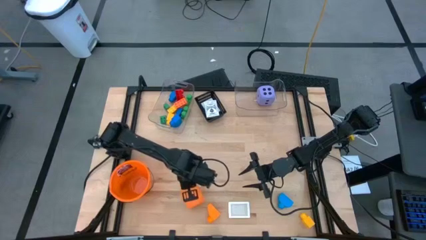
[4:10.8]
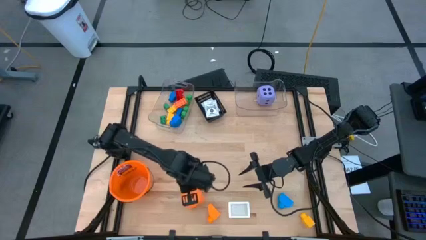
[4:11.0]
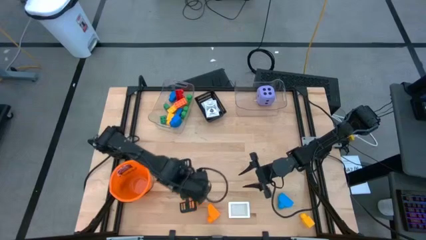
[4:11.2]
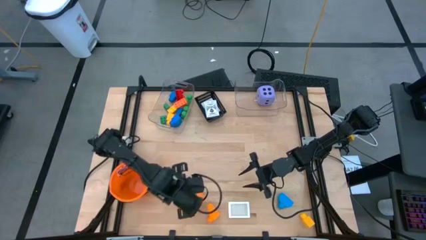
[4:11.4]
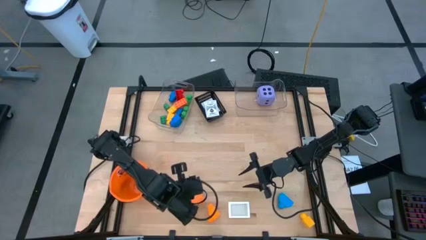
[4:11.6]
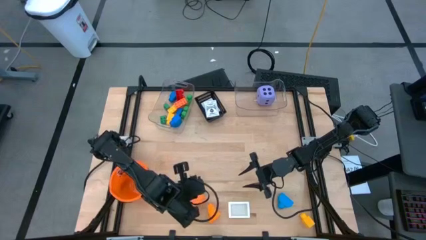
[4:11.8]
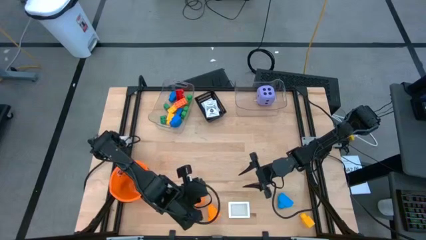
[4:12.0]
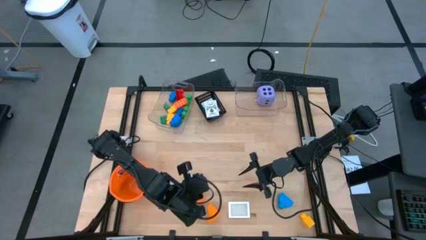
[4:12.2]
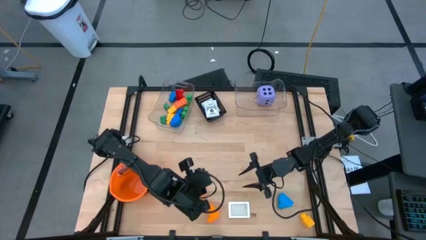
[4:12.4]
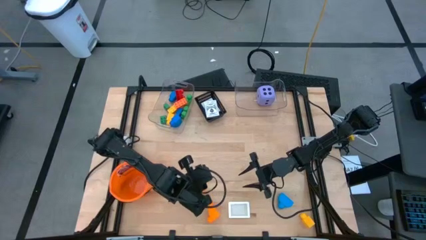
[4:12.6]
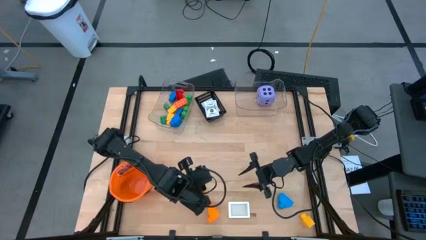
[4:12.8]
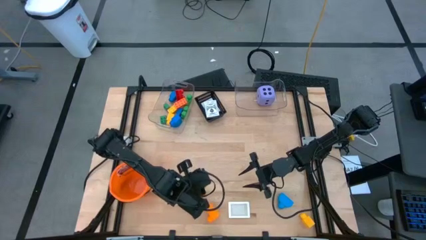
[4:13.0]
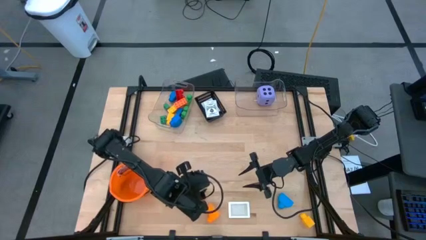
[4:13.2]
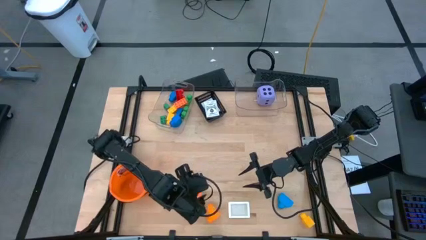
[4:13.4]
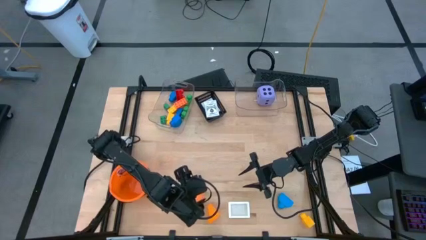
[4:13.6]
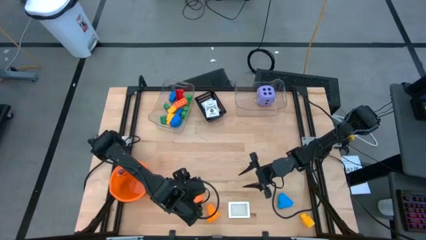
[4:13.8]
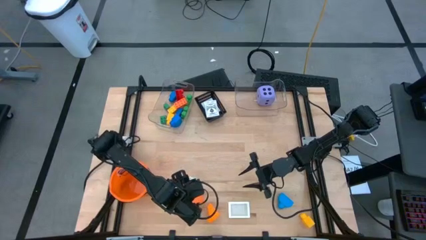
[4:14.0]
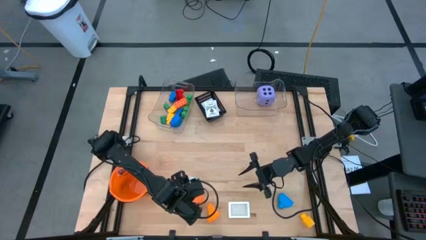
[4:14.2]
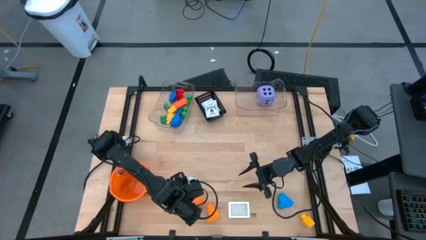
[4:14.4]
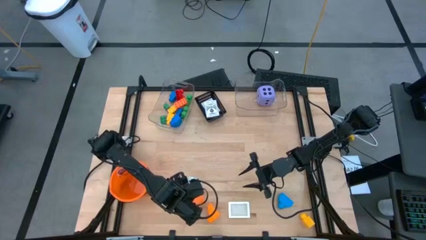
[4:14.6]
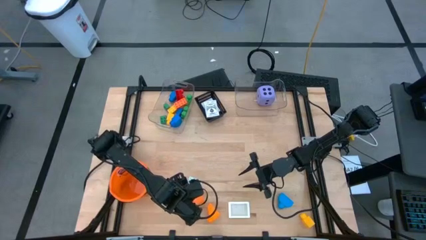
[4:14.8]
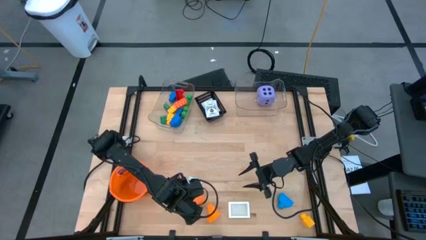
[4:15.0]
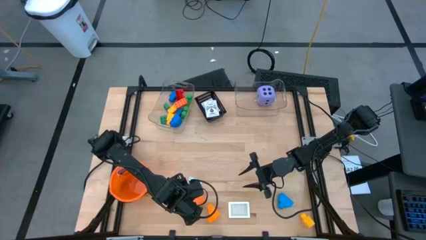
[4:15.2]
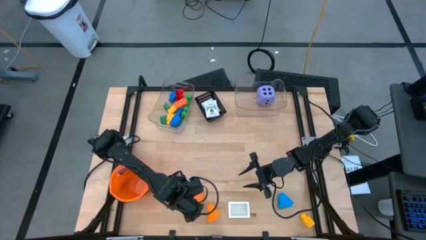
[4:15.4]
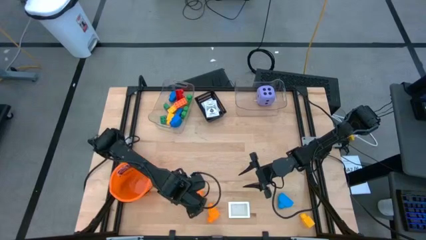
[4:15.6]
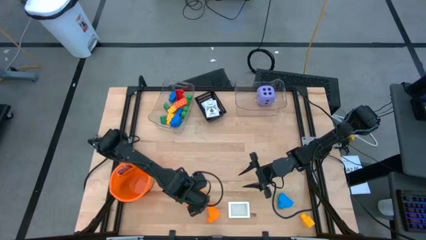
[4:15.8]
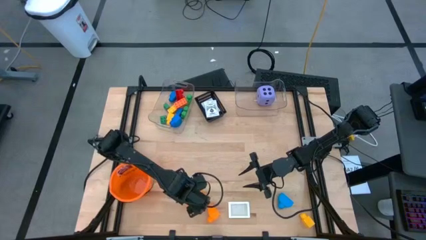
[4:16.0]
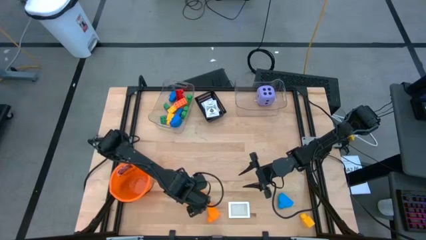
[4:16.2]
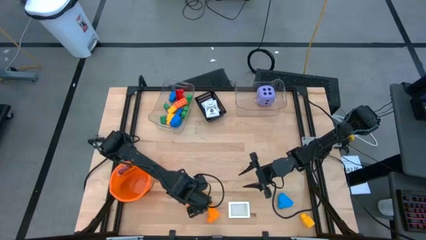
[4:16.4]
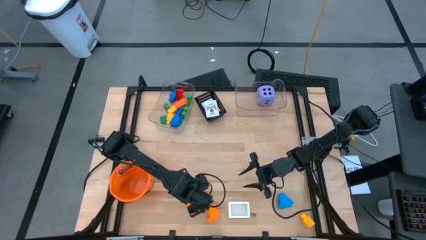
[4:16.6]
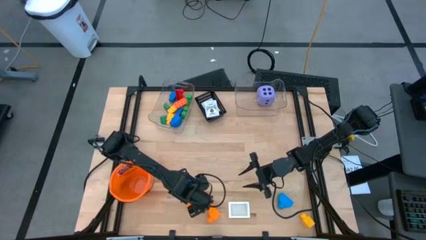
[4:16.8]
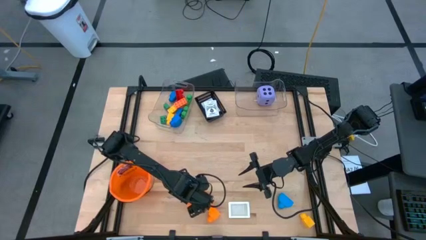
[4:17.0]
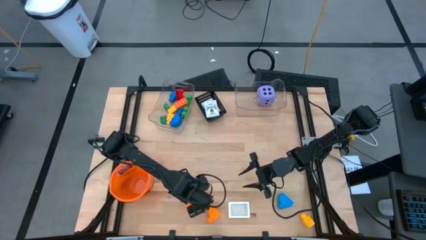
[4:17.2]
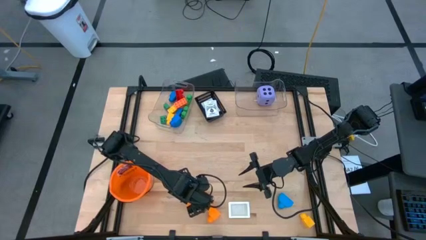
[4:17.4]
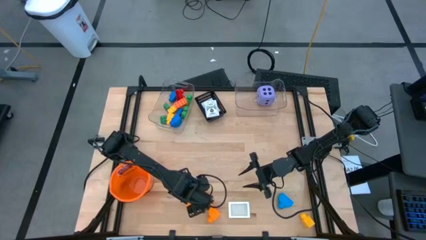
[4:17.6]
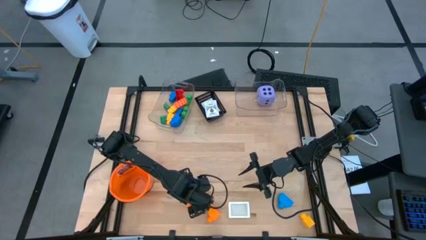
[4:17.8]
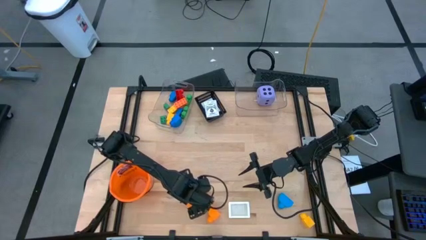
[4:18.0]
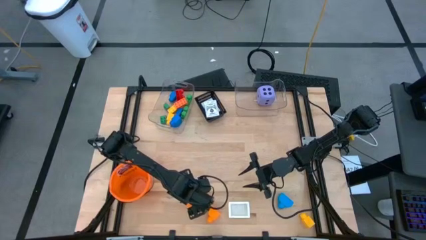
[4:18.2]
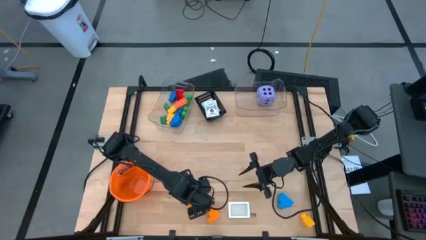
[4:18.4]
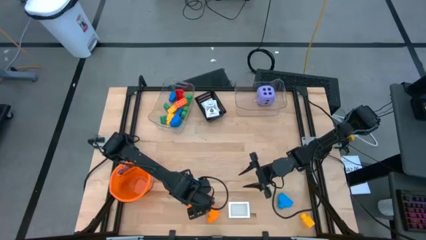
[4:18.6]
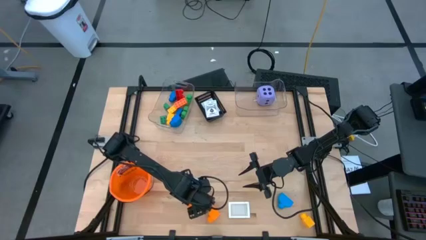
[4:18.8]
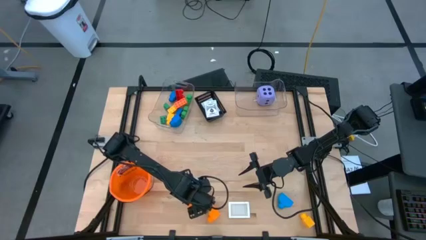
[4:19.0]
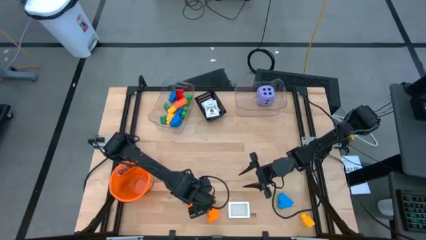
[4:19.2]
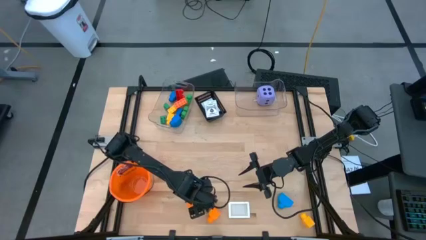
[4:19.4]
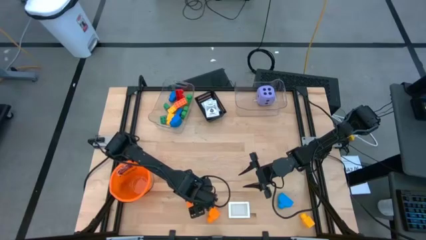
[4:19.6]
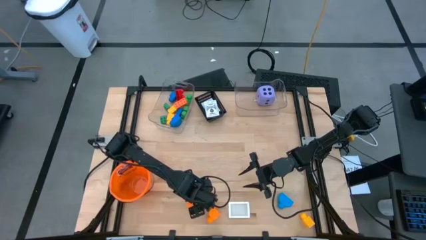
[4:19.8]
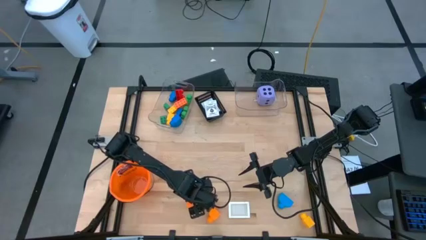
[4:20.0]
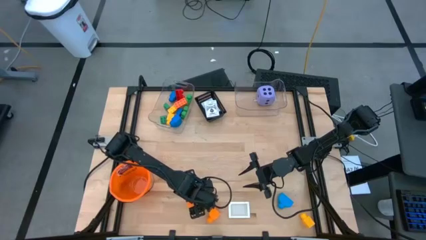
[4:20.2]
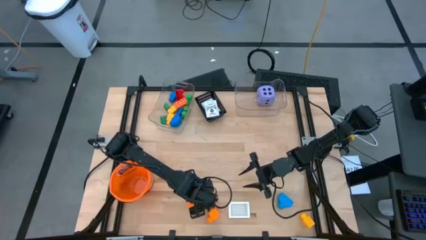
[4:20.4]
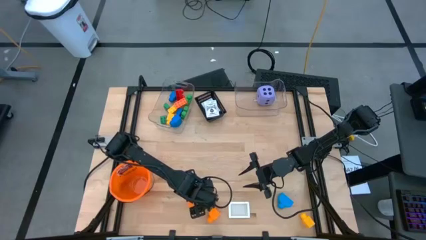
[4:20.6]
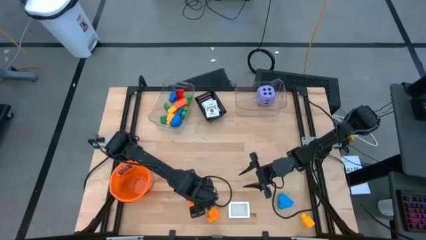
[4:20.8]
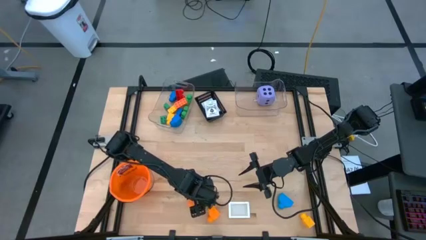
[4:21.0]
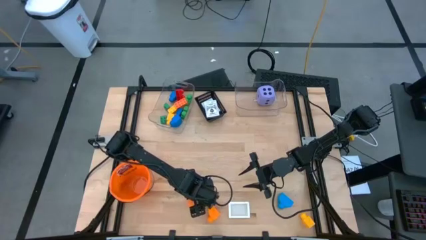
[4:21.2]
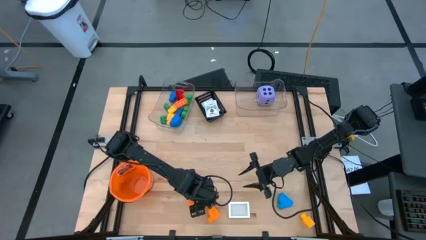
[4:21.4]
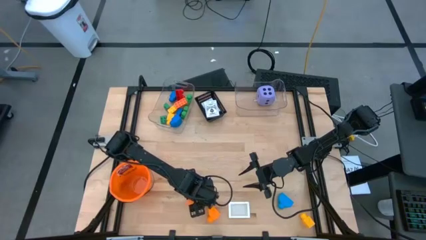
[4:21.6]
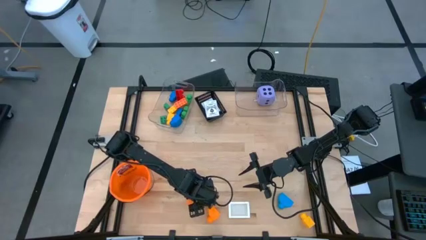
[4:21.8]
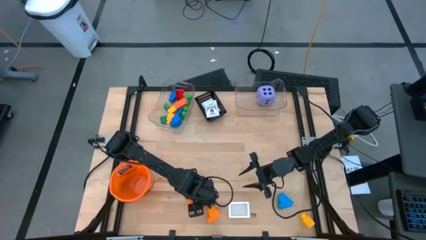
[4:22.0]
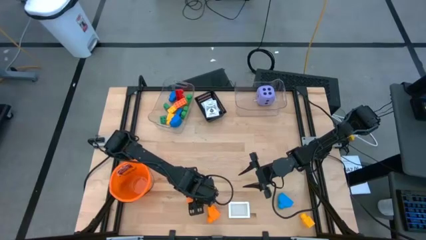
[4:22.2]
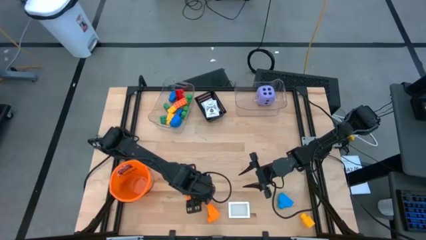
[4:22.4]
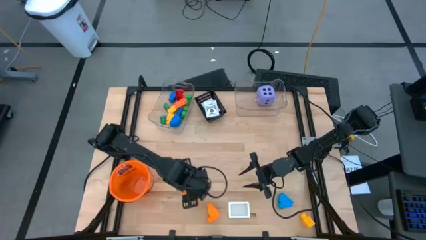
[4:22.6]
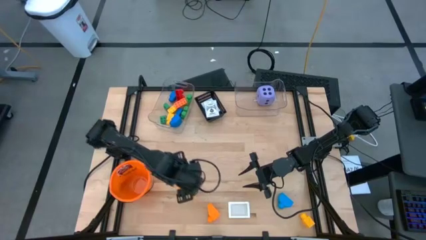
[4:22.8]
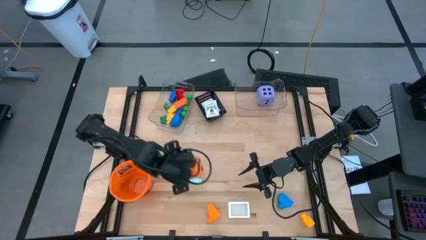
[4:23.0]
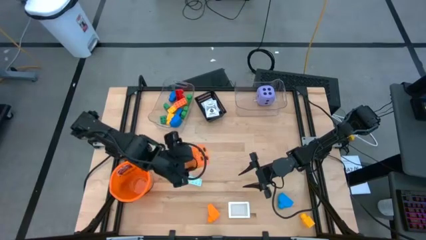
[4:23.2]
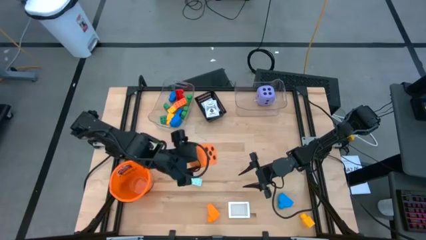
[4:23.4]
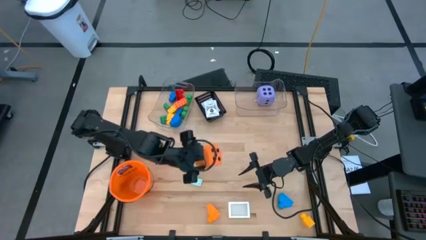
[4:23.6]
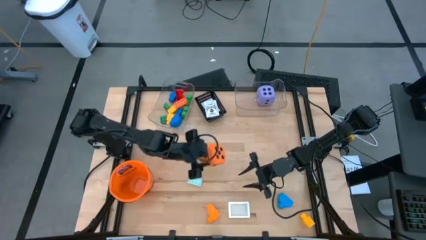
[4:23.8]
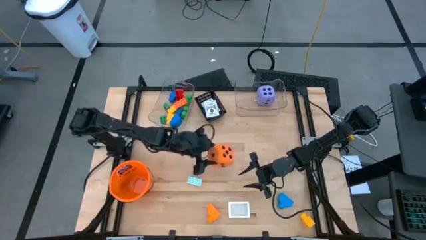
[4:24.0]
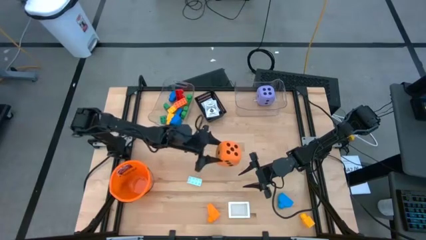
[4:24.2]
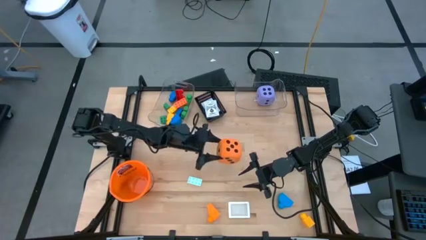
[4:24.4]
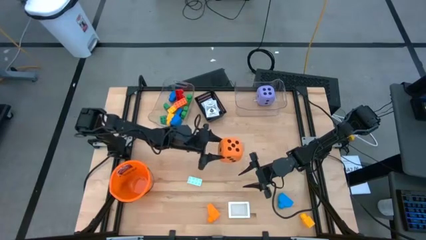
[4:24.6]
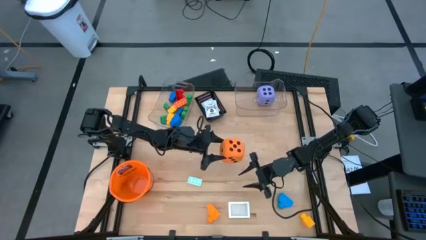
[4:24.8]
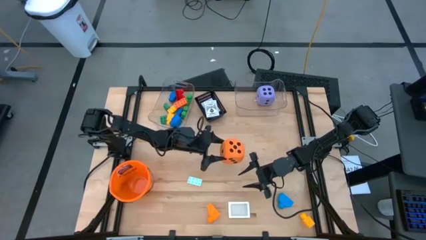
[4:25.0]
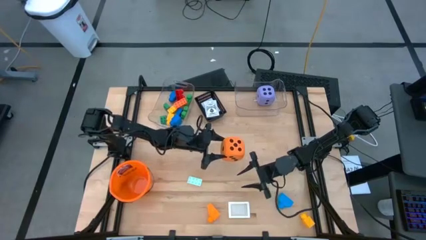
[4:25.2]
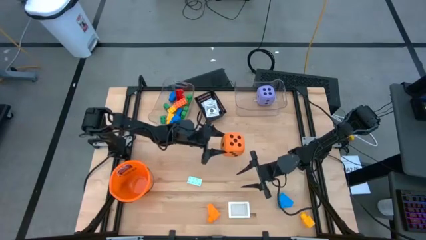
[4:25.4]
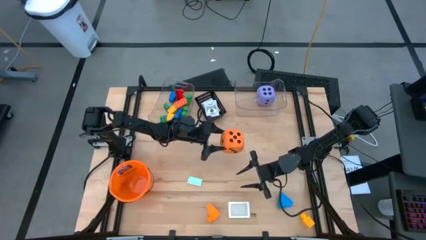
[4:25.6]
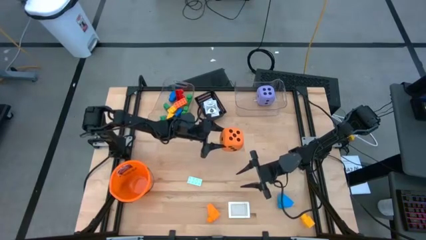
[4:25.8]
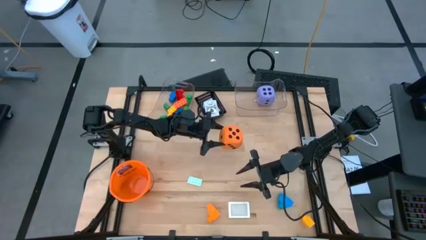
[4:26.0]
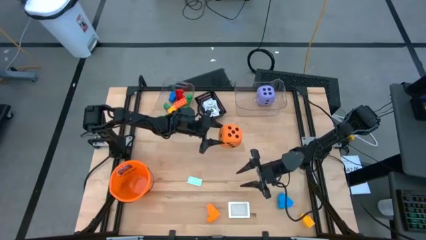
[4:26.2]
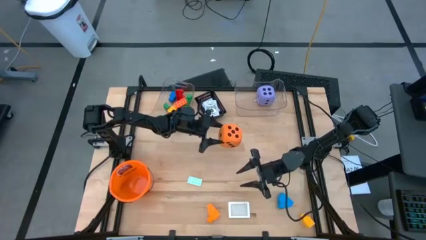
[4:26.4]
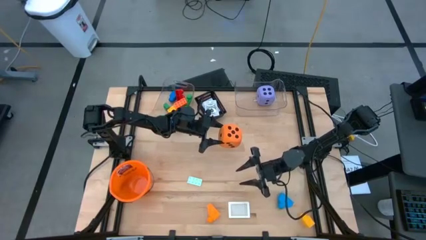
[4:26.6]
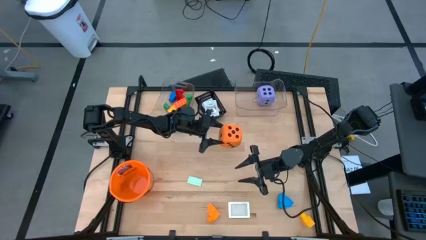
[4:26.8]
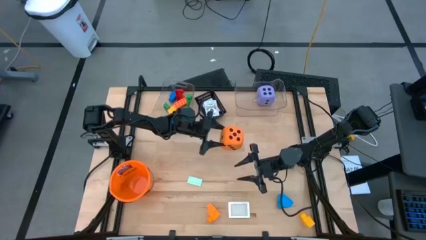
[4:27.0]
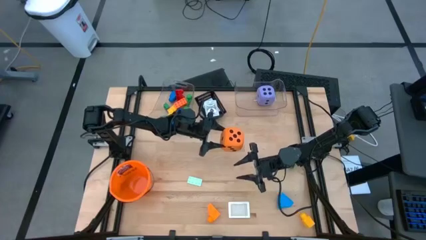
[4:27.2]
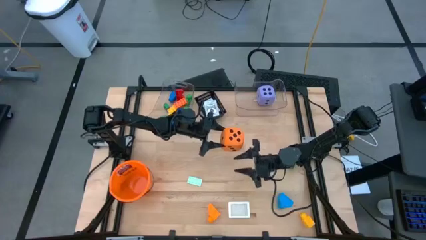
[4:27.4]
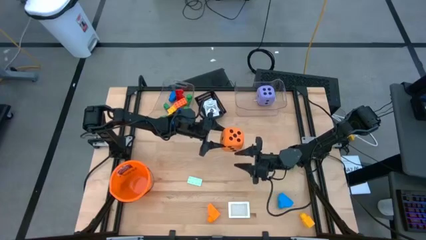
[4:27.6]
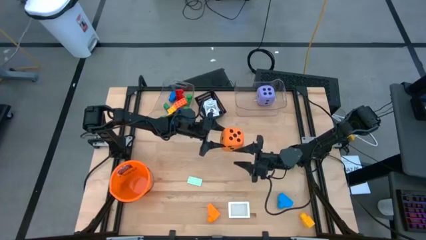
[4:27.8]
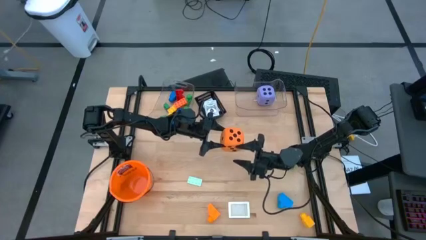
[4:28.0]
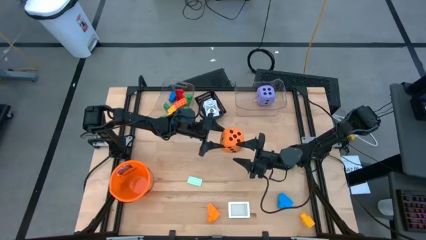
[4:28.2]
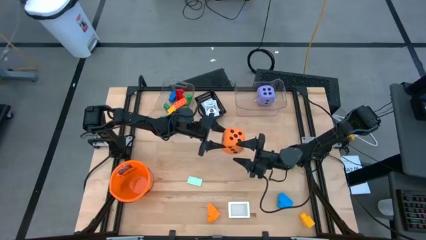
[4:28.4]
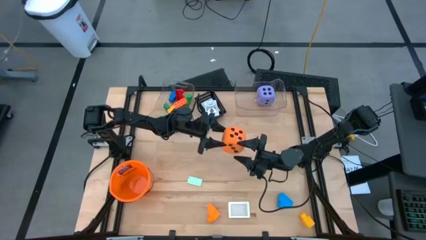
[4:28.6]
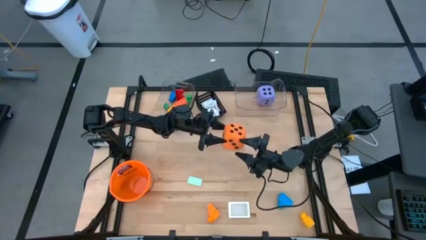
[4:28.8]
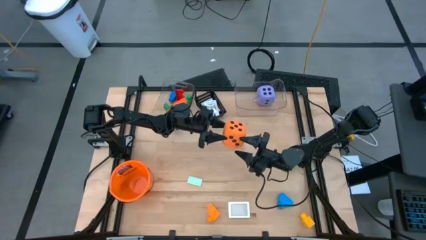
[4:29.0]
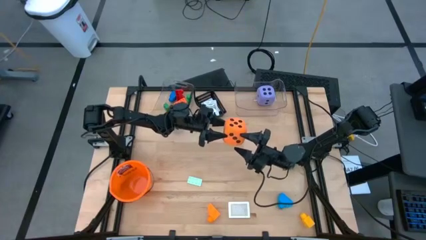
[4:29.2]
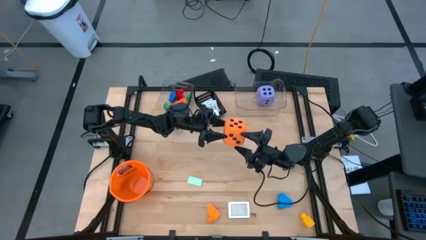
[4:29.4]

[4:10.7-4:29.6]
Task: Pick & Place Toys
Put the orange dice into the right transparent bin
